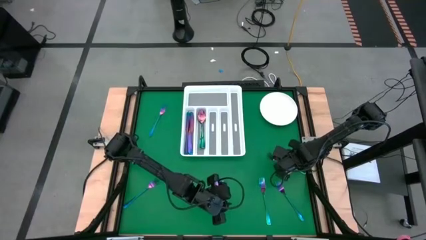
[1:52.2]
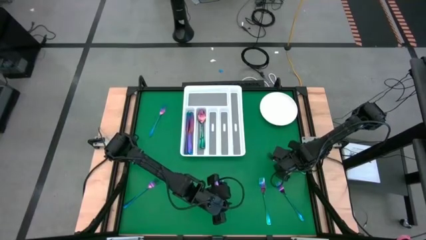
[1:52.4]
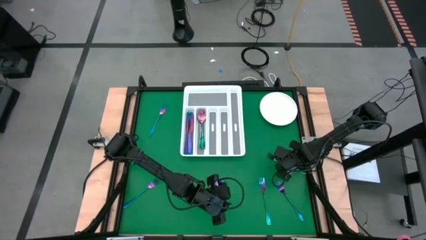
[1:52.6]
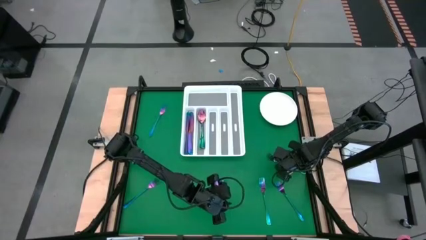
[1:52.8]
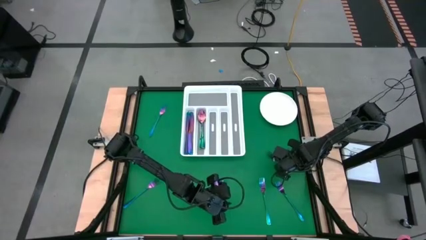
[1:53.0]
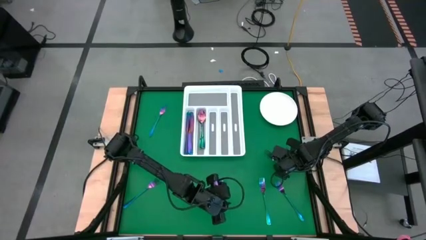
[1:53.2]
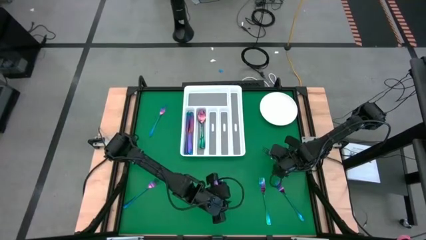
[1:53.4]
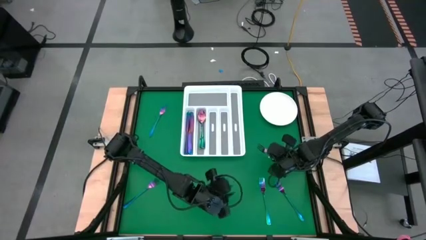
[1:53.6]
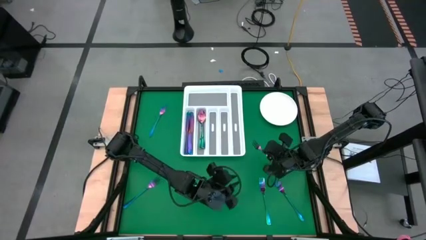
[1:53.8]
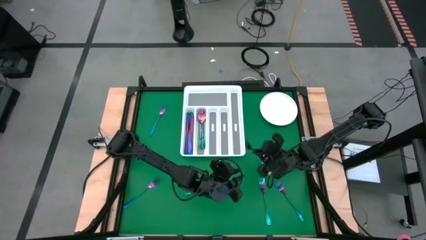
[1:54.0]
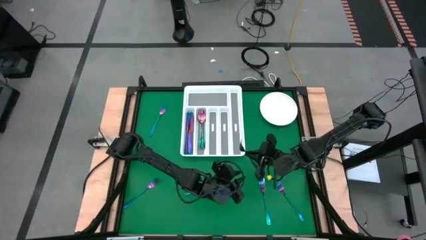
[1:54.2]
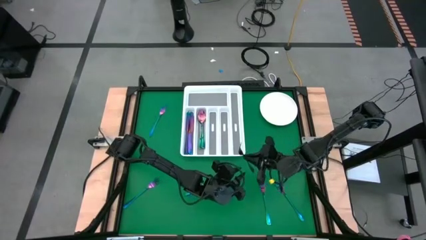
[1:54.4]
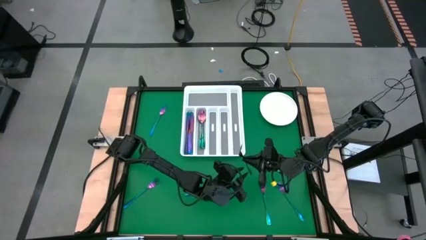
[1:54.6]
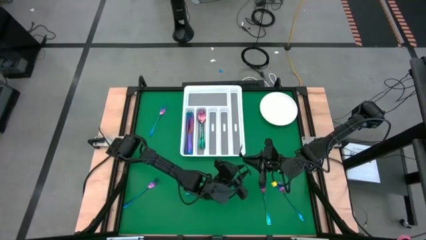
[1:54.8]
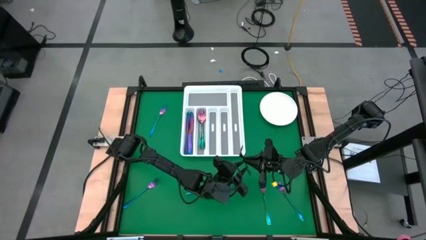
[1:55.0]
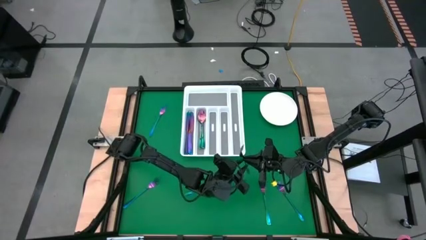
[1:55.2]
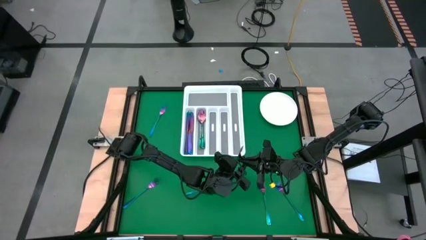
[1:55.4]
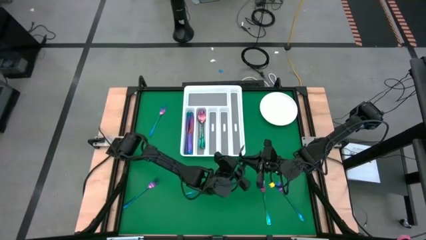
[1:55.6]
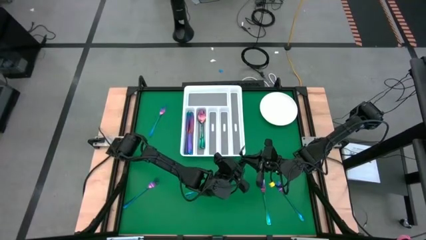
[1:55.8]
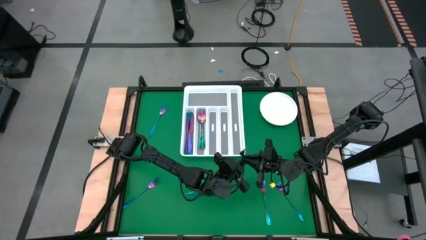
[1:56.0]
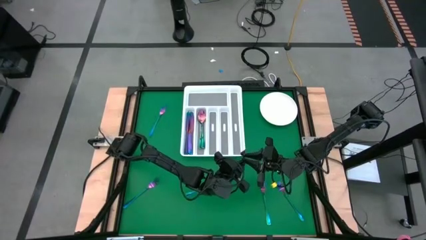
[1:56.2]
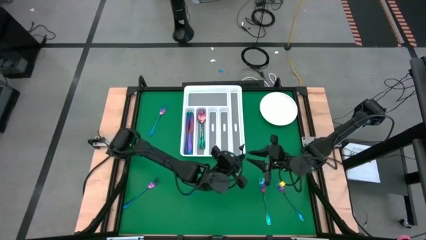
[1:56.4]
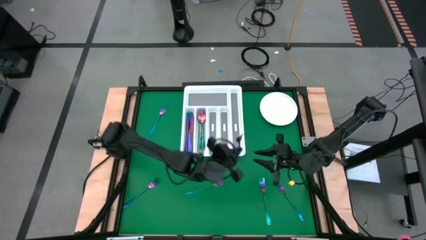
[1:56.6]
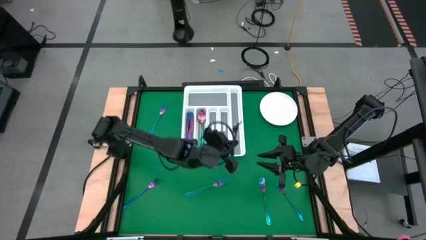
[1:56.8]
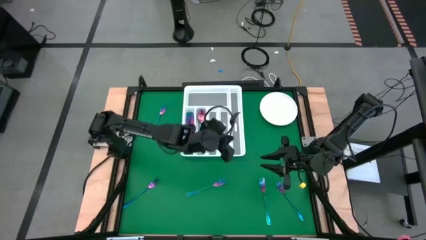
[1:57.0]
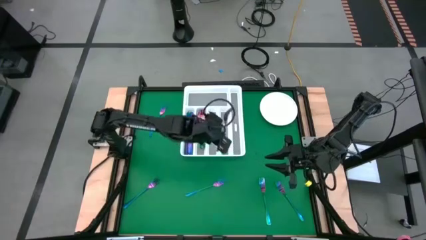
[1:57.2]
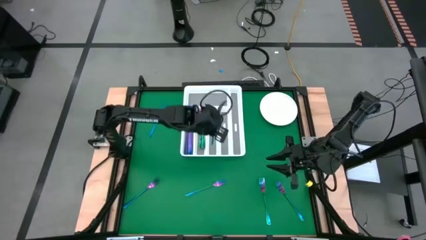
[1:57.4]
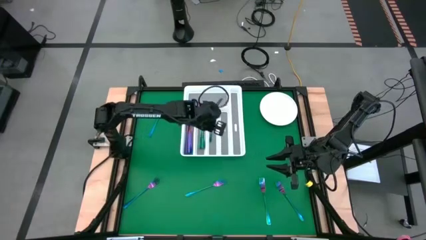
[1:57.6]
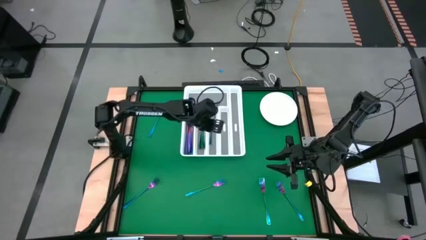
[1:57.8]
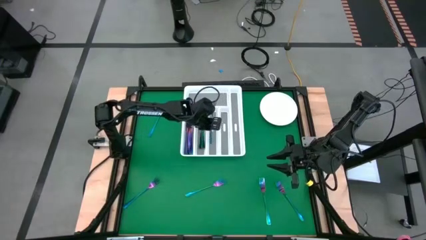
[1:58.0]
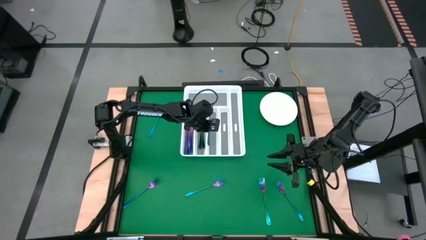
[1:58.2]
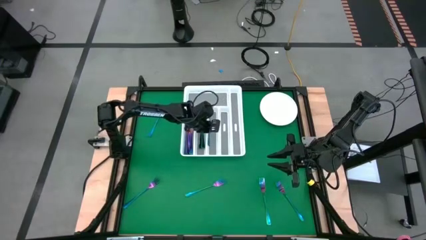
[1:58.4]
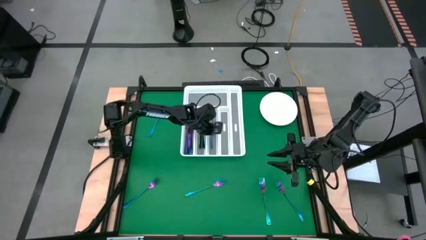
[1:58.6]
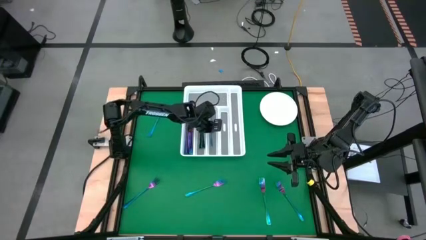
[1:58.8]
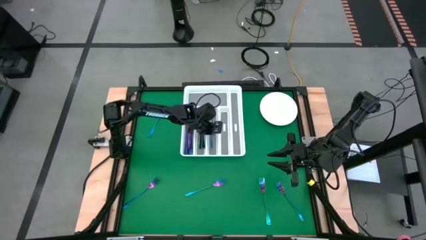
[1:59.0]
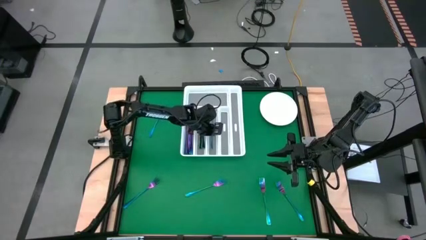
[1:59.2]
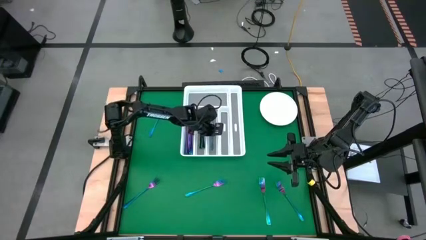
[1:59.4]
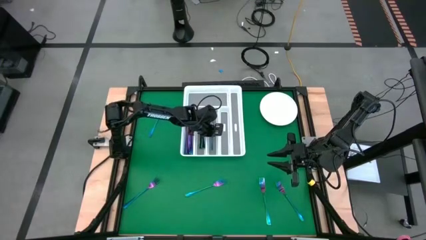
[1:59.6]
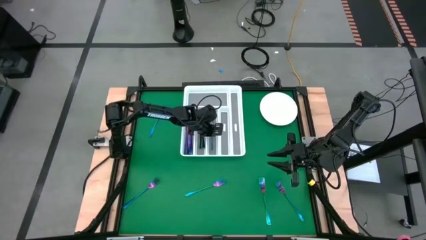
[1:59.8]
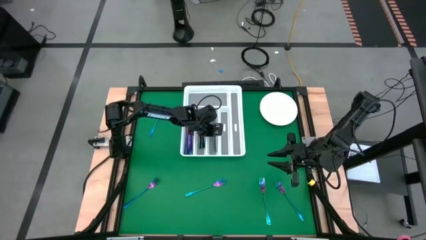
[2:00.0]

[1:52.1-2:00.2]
Task: Sort silverware
Put the blue fork into the silverware tray

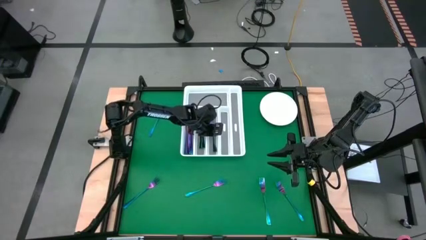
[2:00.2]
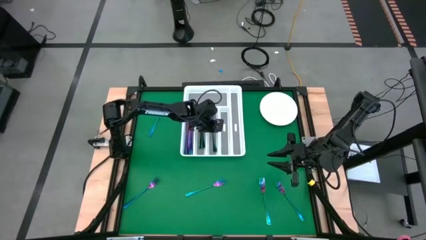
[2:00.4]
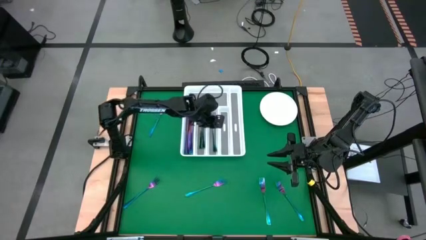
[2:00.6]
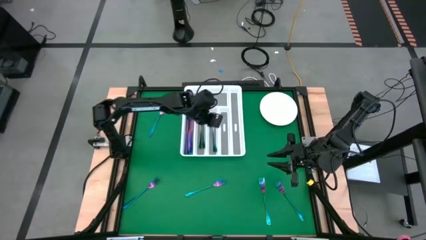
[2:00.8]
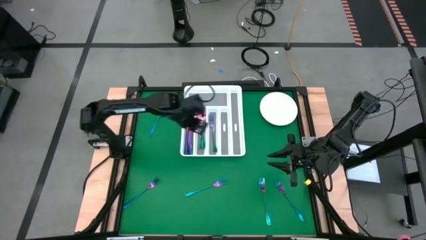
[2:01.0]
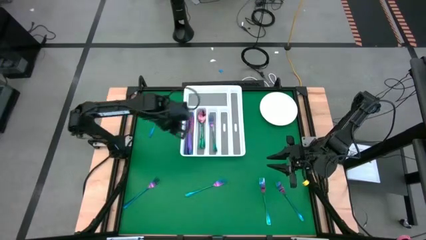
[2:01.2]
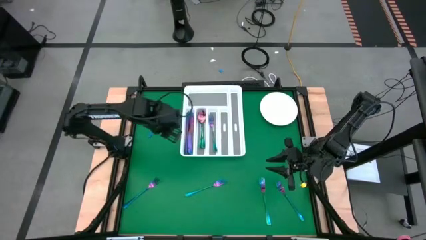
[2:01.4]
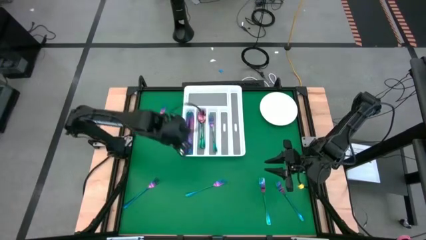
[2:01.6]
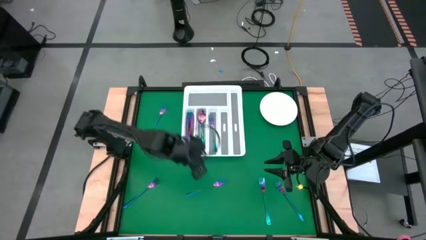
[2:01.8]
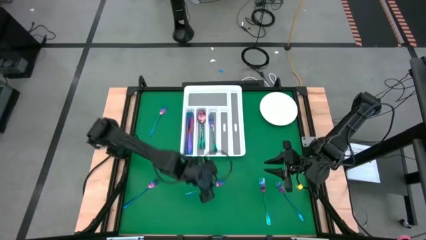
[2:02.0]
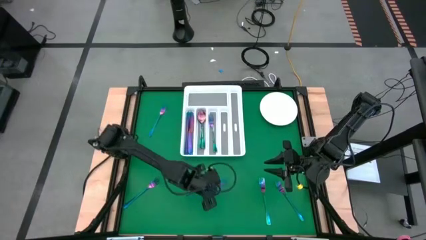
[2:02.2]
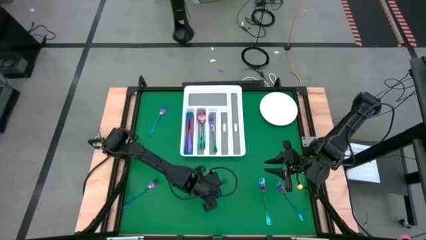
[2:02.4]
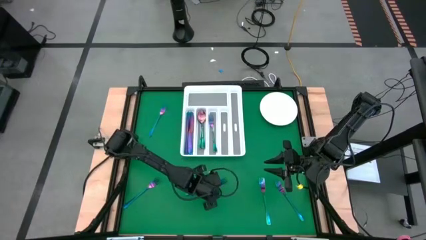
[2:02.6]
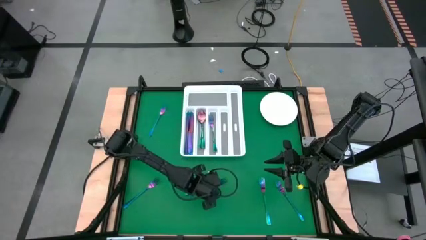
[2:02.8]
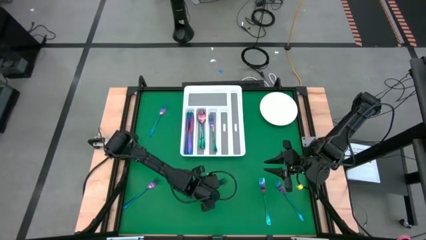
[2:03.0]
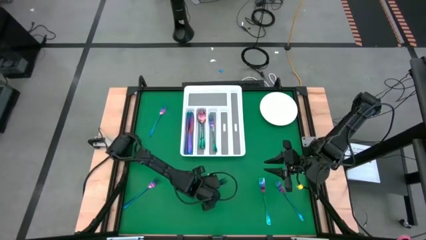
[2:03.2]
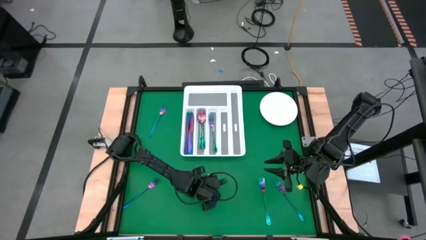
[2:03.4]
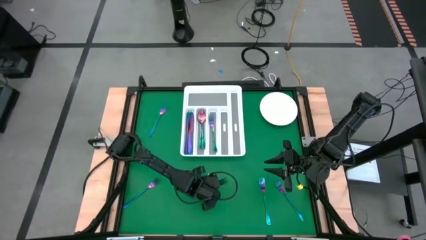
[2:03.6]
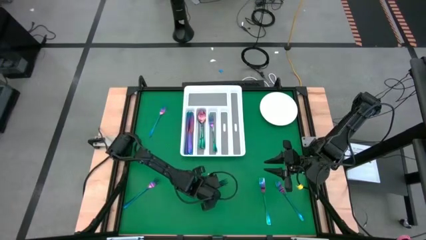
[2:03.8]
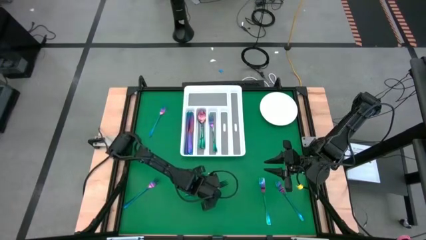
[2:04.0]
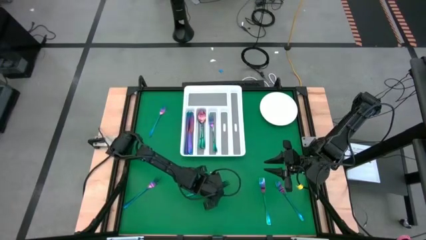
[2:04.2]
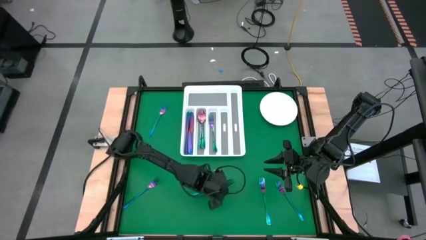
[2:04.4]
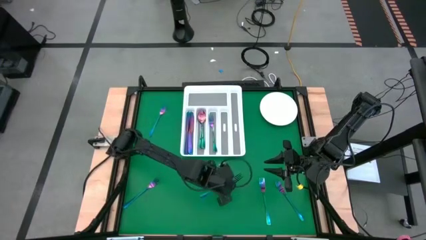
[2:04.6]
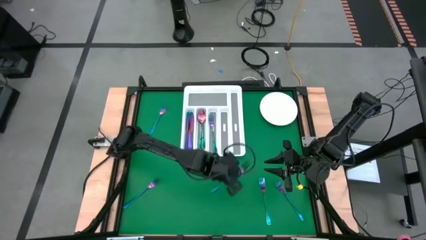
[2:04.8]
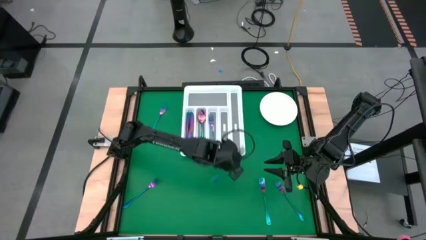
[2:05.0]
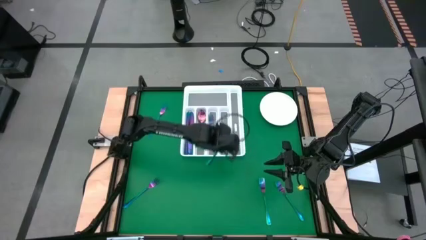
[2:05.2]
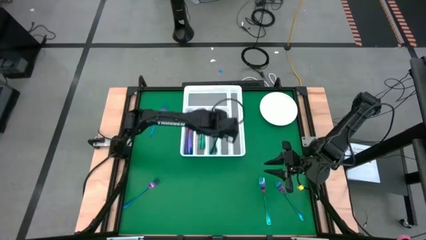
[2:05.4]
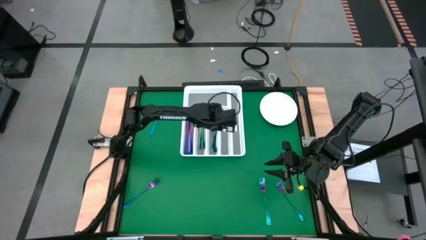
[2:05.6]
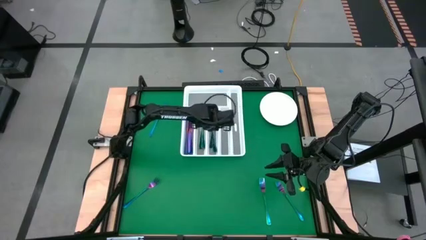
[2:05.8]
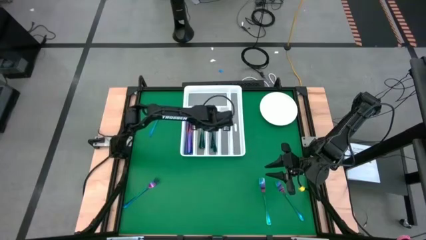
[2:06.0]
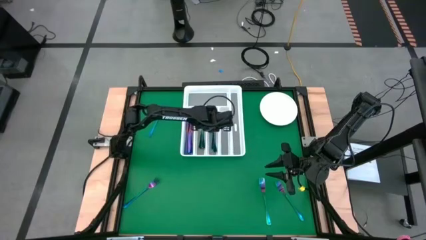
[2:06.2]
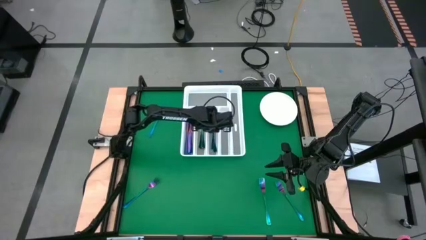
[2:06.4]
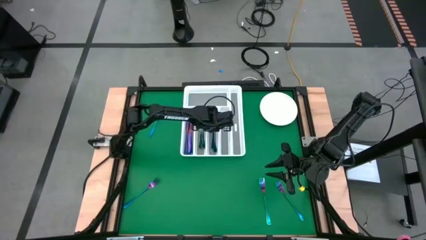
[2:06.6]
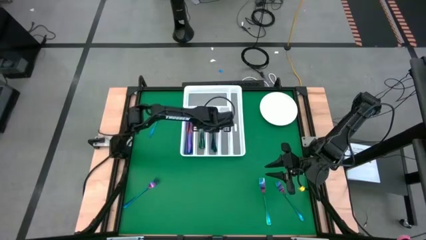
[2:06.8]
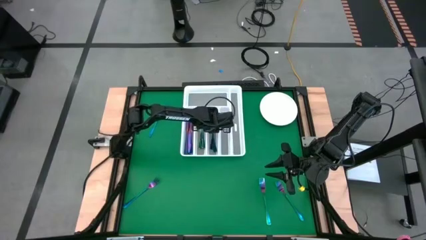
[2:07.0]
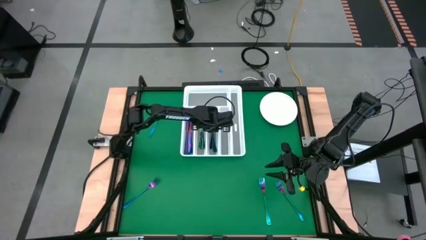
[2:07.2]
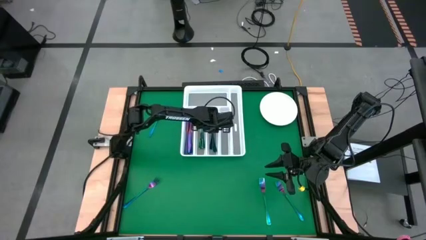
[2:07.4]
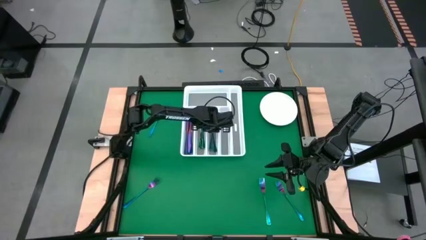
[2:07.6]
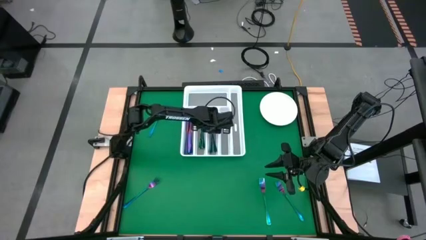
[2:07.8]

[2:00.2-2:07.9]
Put the blue fork into the silverware tray
